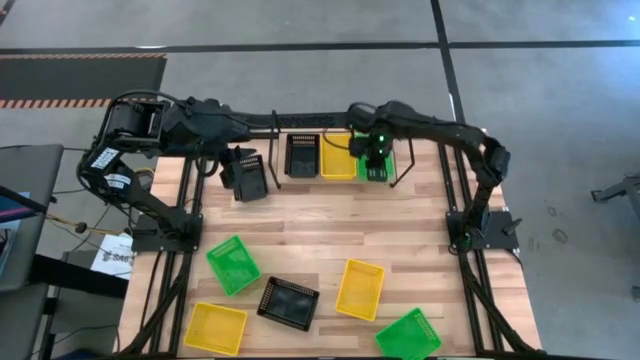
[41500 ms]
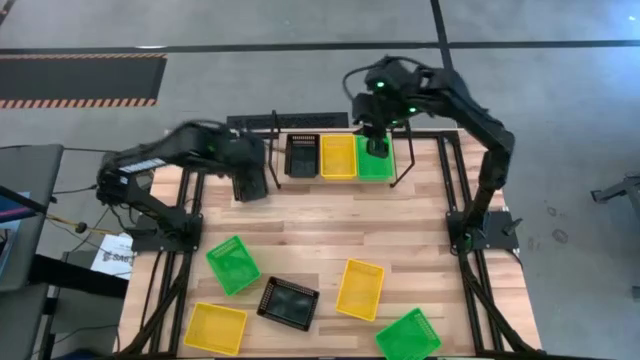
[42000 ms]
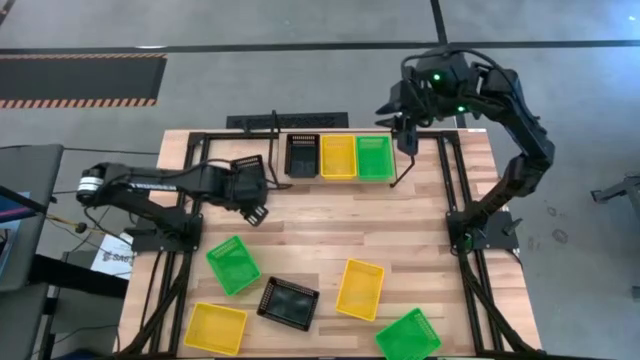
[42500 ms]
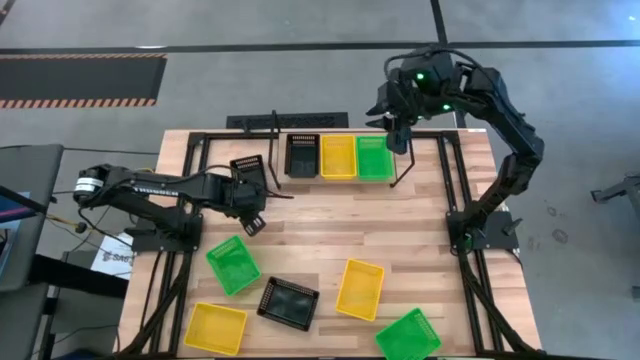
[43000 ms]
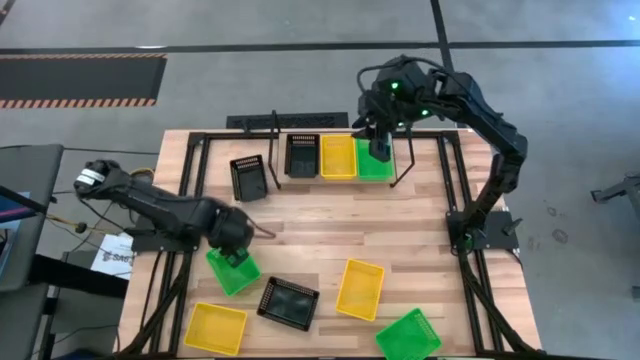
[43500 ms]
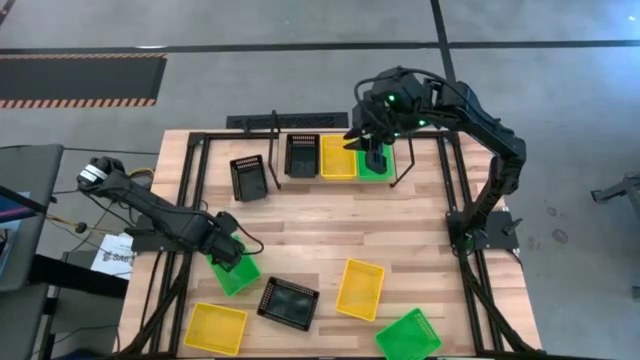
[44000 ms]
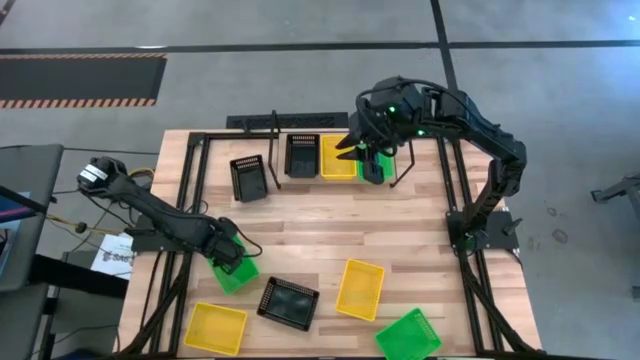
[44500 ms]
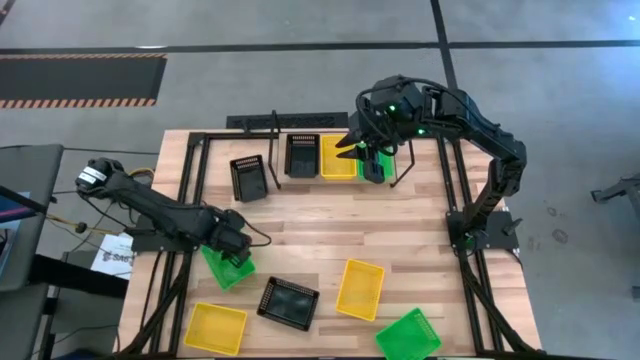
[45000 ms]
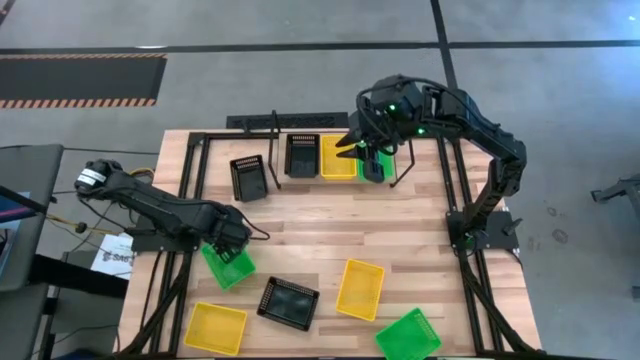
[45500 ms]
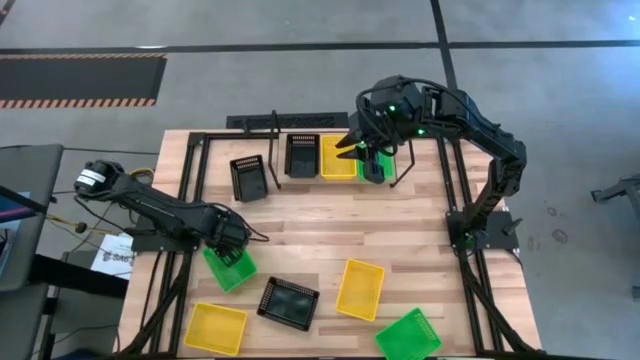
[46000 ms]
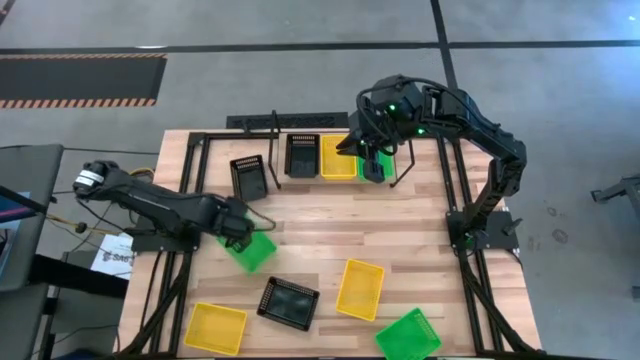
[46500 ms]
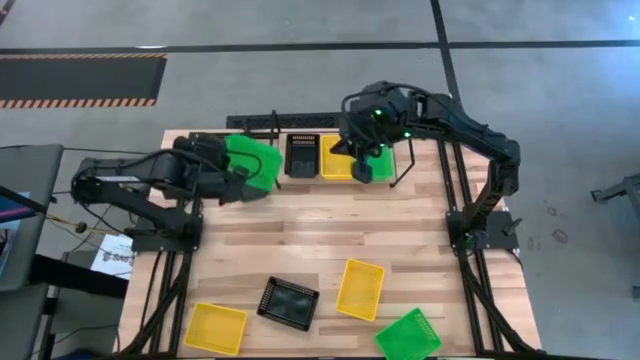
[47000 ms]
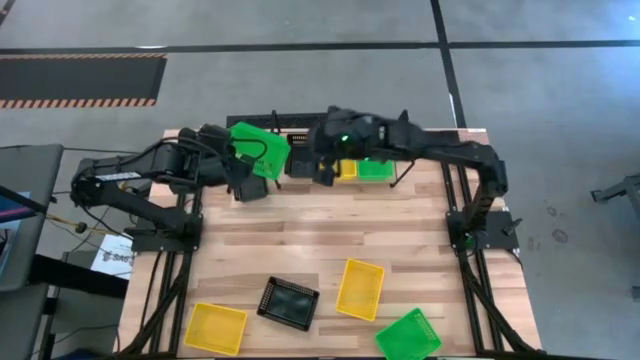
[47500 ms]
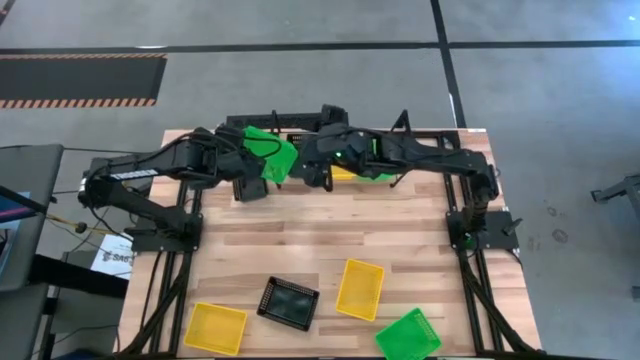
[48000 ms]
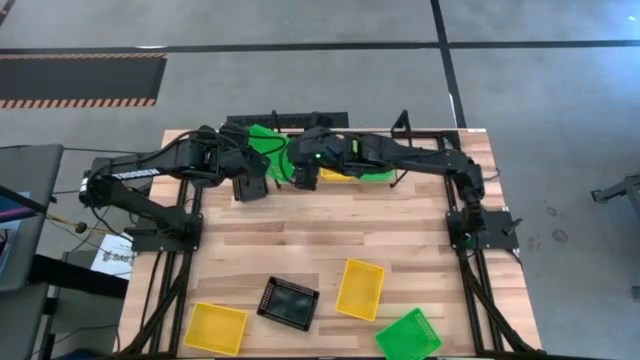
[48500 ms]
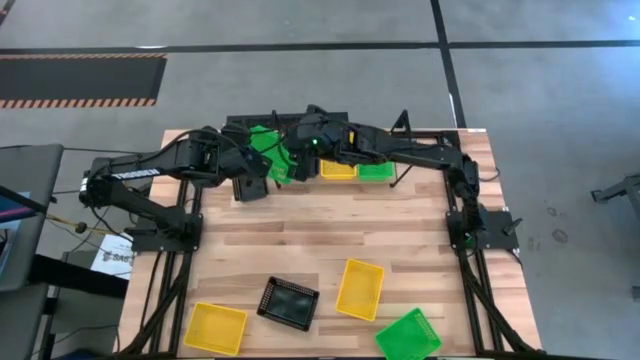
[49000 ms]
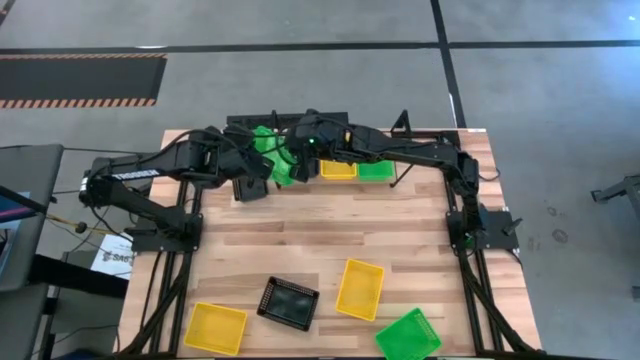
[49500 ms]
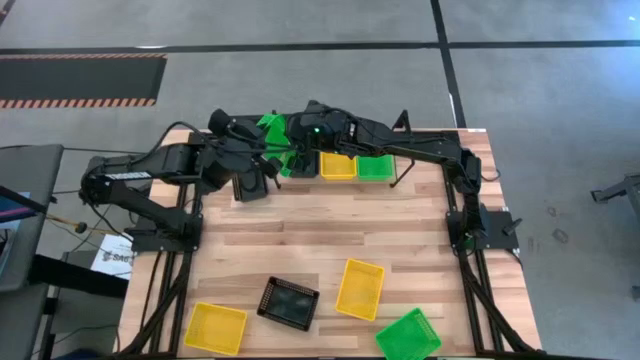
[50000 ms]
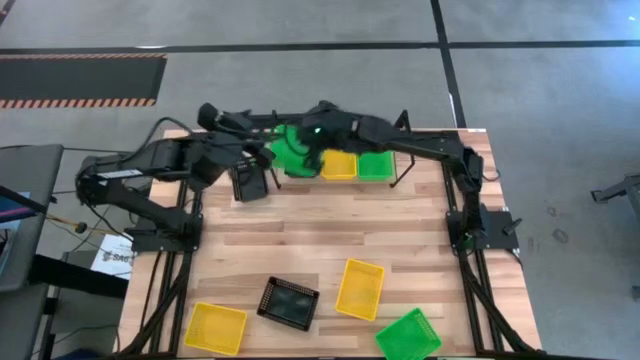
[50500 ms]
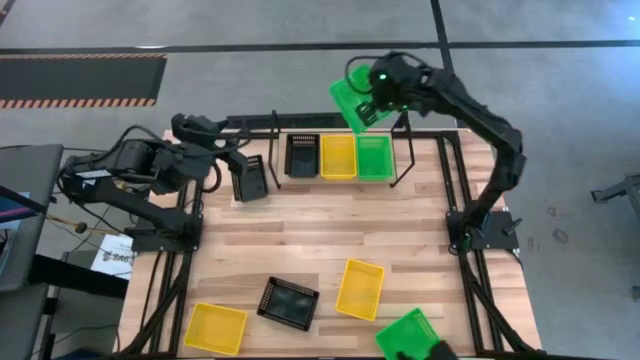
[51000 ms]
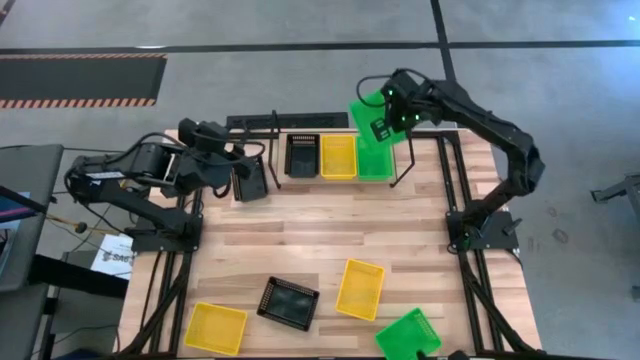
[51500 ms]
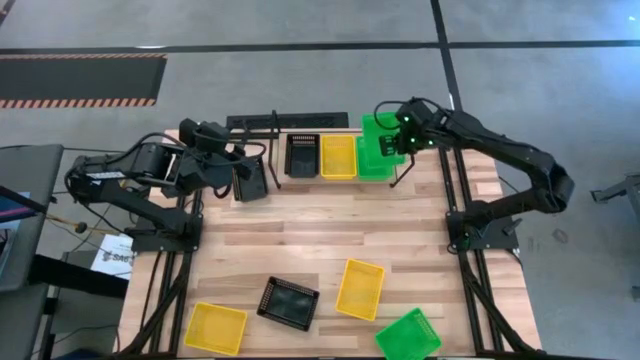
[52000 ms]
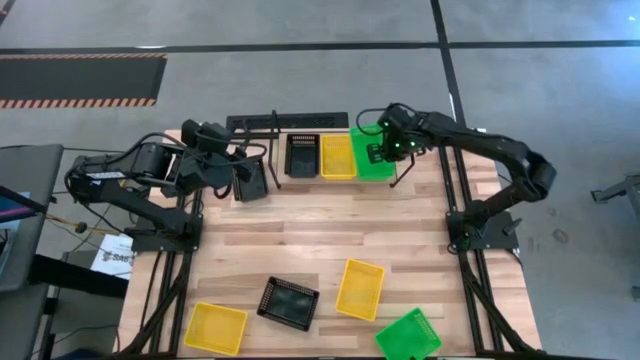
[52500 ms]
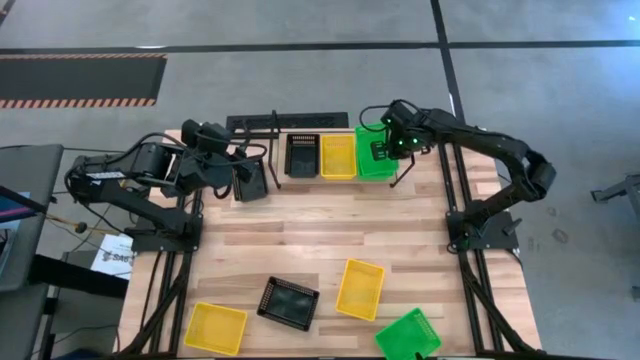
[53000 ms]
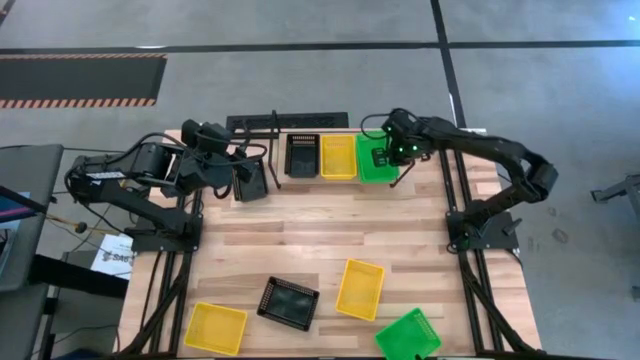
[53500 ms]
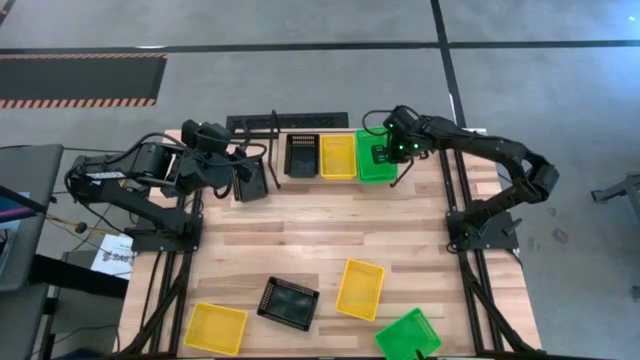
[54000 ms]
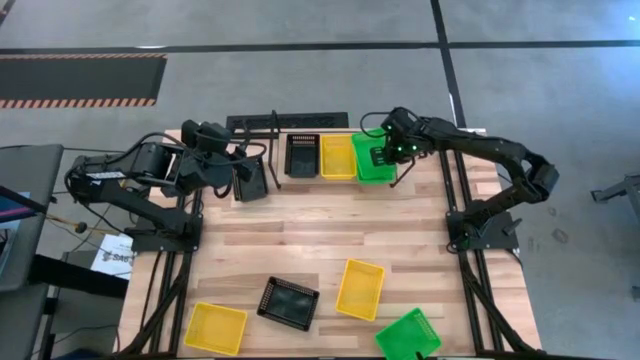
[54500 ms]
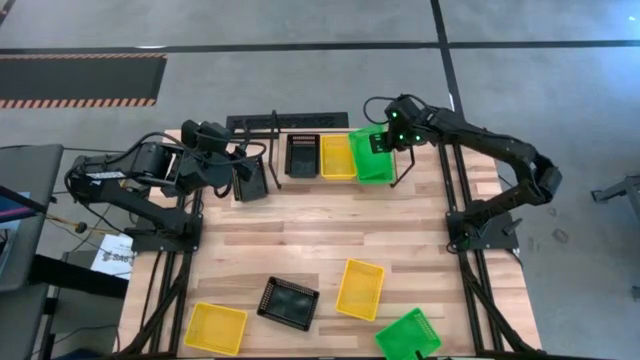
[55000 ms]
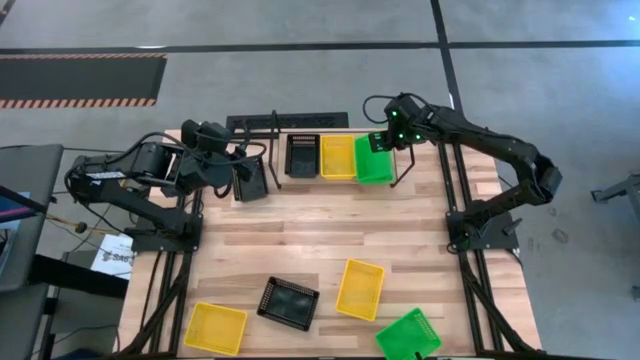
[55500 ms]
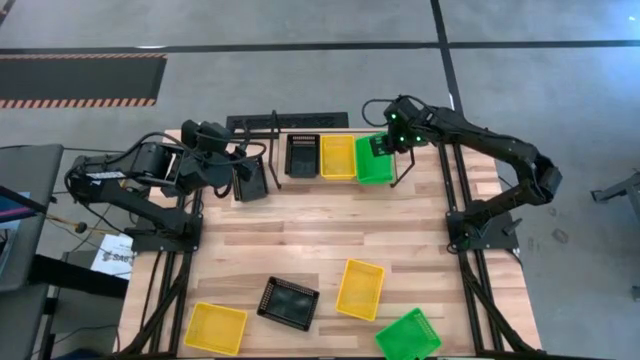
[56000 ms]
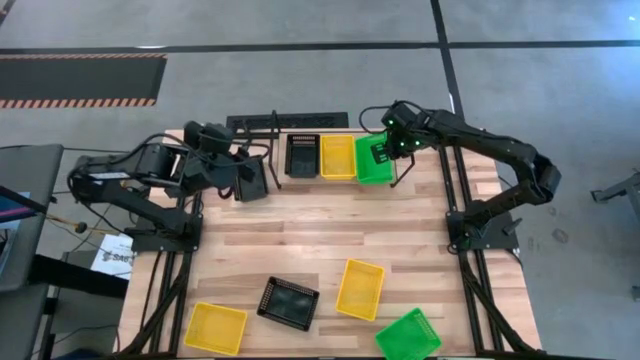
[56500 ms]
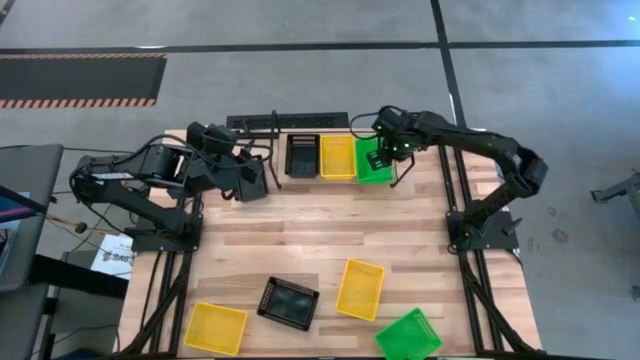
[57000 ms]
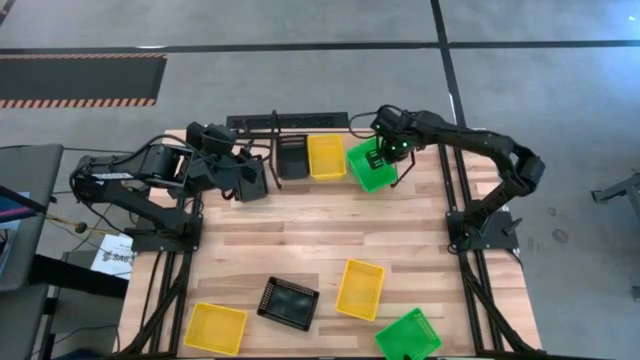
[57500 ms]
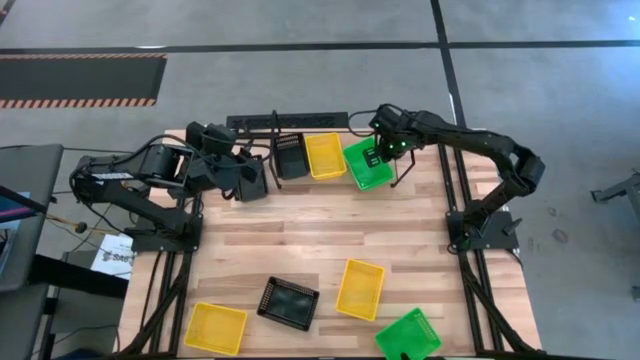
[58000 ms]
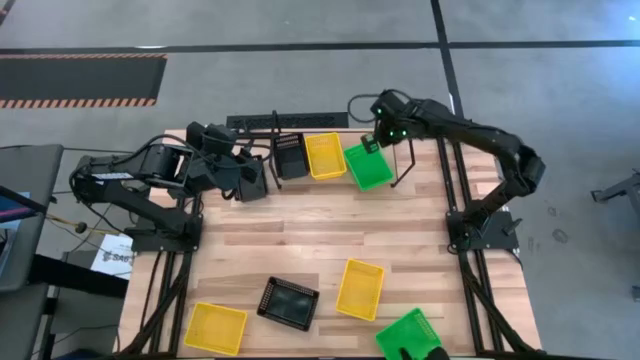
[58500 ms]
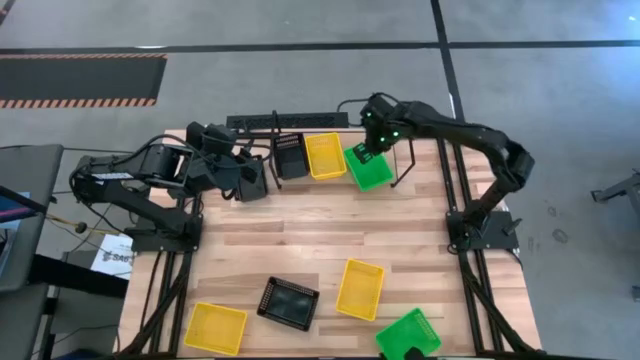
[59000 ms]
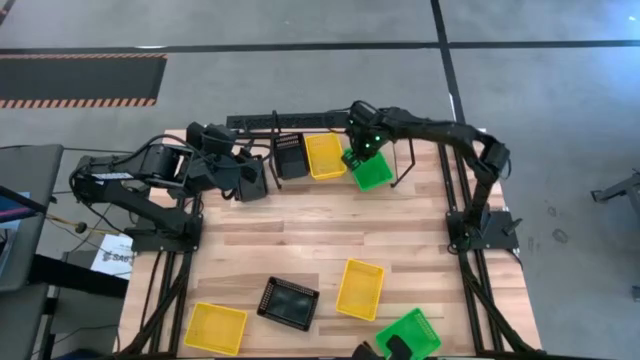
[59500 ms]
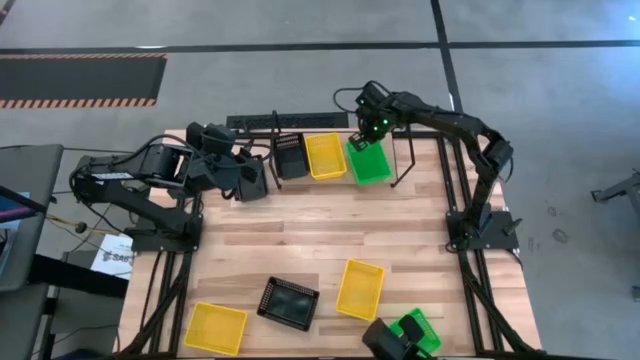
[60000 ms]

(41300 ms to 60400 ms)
Task: Stack baskets on shelf by color
Stack the left green bin on top of the green bin on the shelf

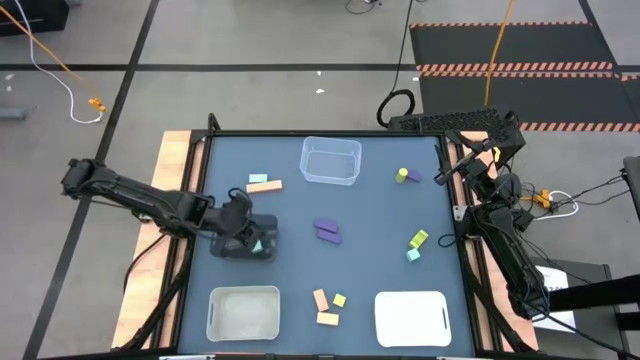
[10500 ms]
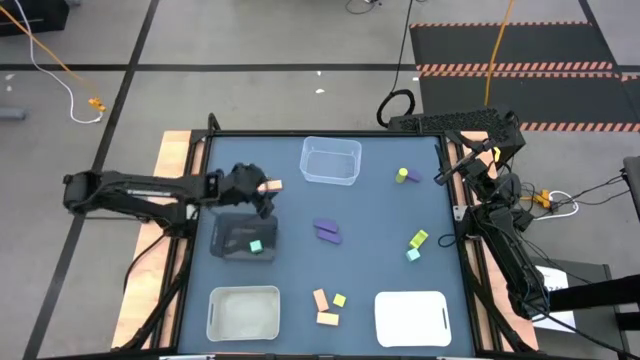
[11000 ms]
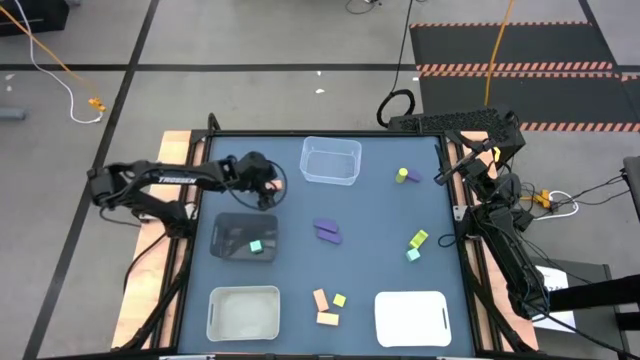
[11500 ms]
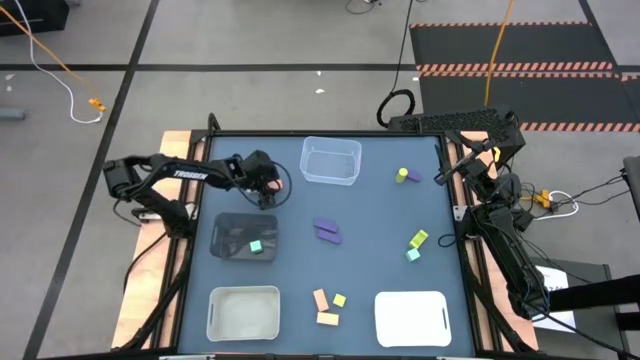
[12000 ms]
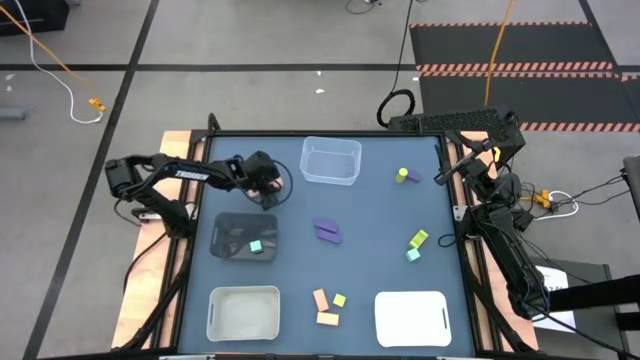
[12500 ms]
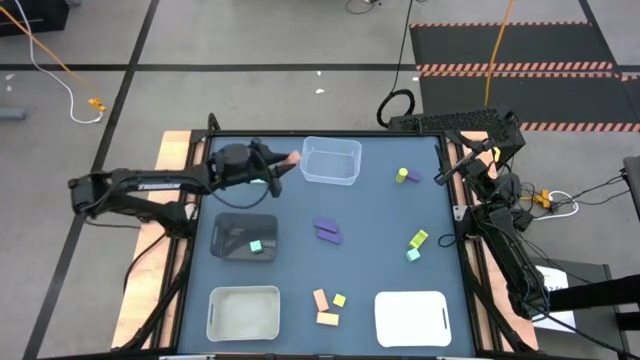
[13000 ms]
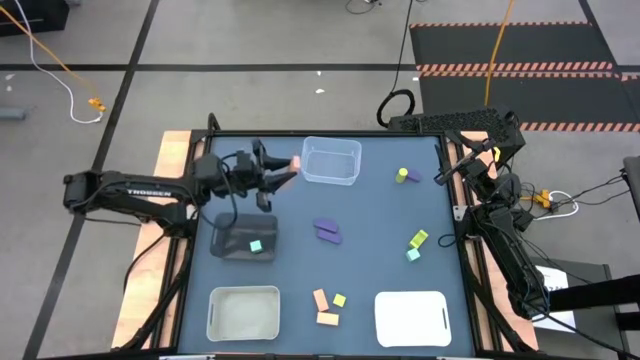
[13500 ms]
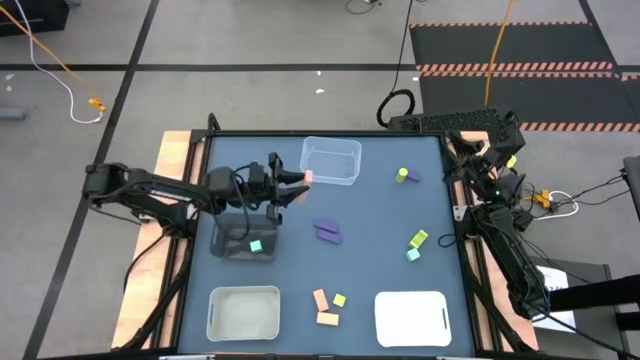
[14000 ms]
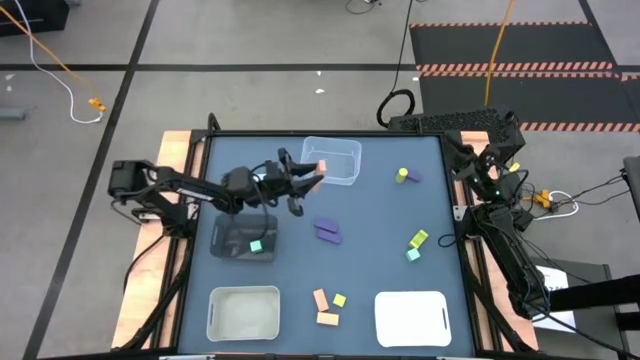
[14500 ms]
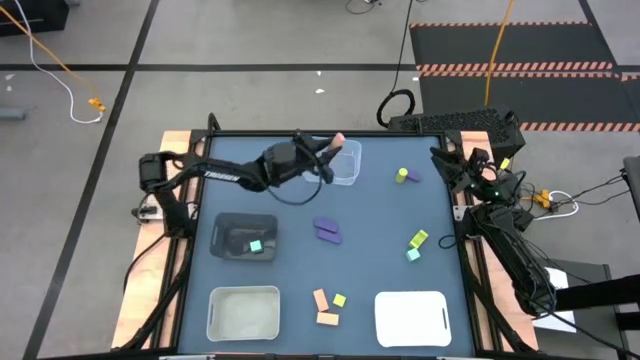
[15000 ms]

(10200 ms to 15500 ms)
Task: Sort & place blocks by color
Put the top orange blocks into the transparent bin
